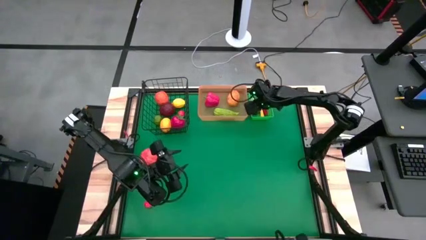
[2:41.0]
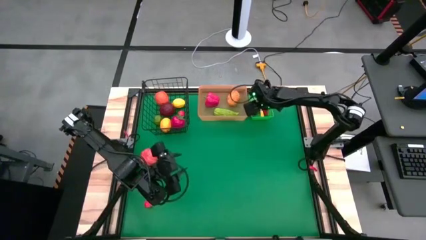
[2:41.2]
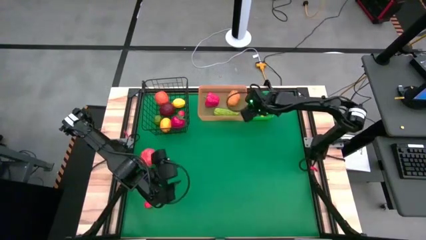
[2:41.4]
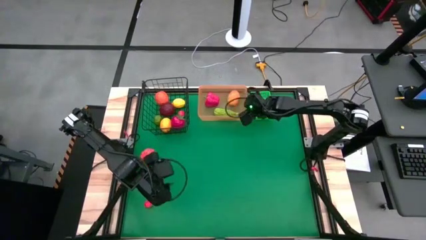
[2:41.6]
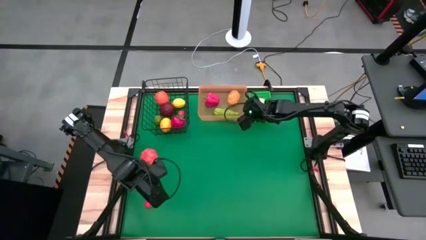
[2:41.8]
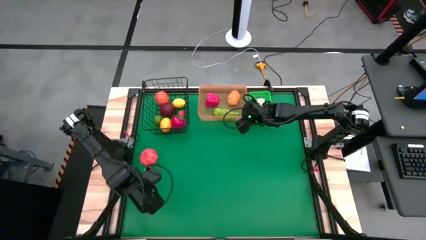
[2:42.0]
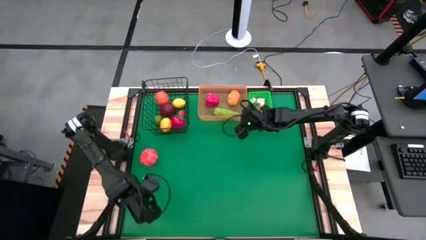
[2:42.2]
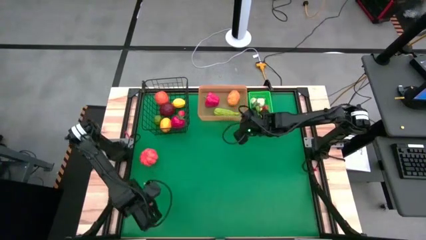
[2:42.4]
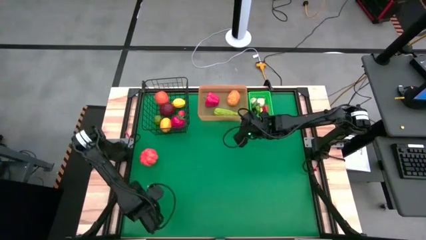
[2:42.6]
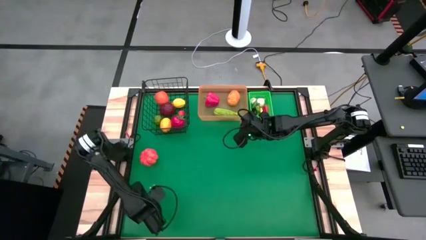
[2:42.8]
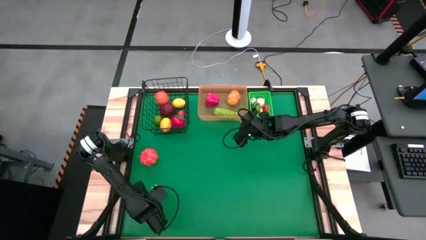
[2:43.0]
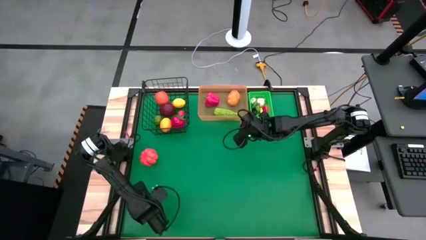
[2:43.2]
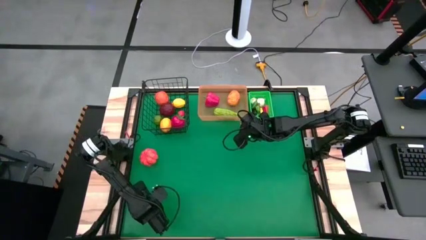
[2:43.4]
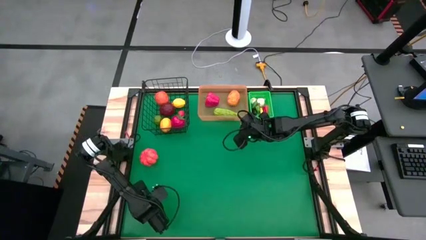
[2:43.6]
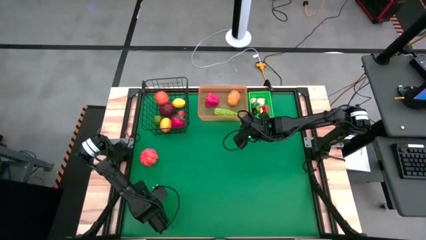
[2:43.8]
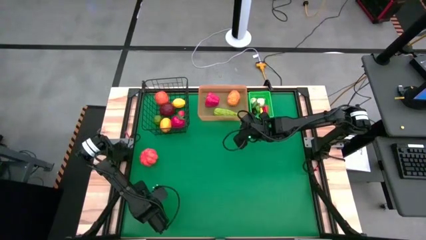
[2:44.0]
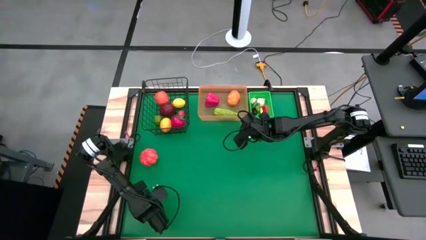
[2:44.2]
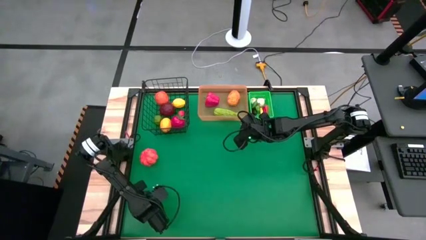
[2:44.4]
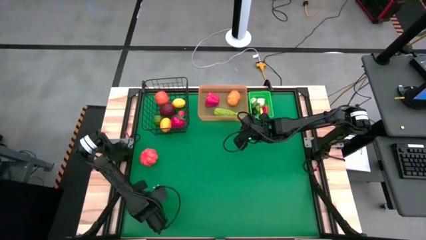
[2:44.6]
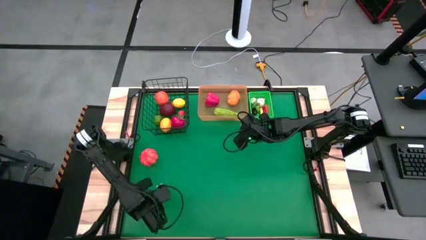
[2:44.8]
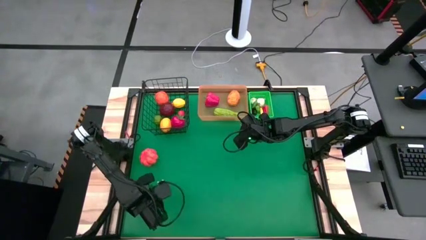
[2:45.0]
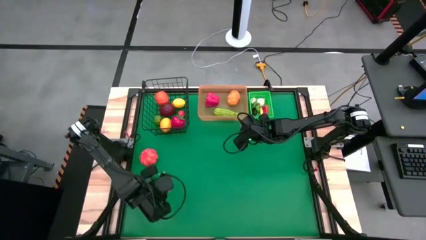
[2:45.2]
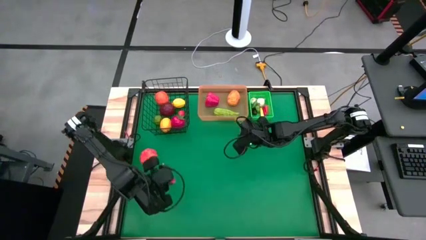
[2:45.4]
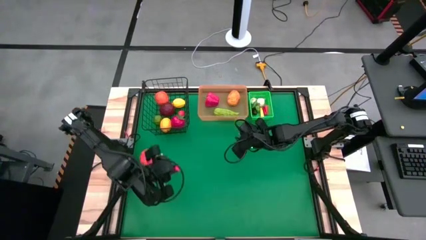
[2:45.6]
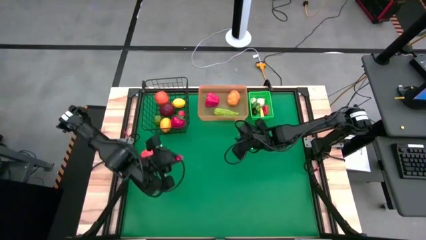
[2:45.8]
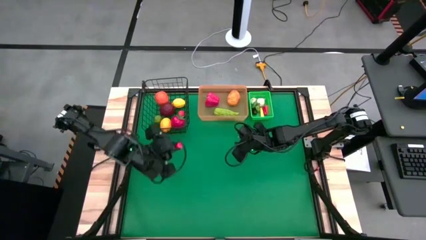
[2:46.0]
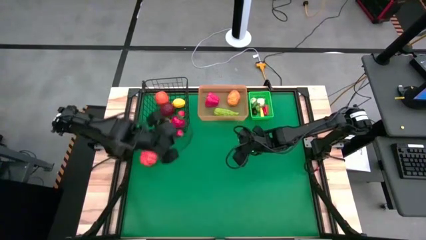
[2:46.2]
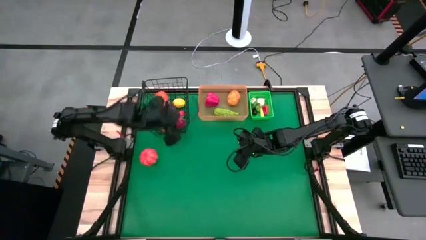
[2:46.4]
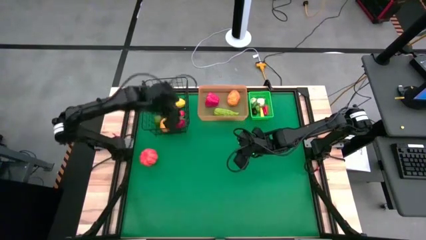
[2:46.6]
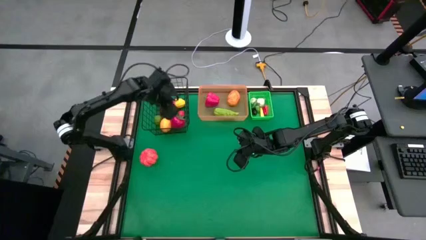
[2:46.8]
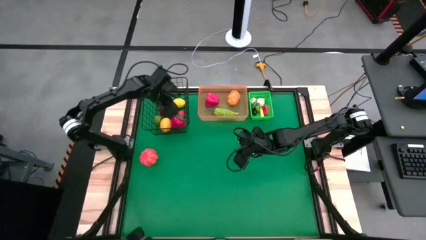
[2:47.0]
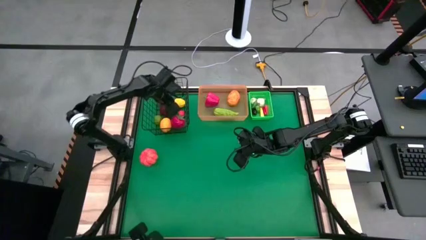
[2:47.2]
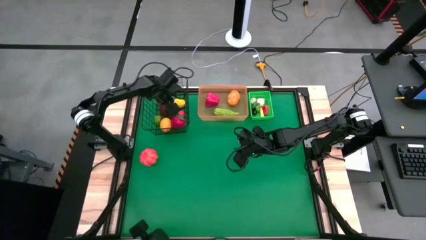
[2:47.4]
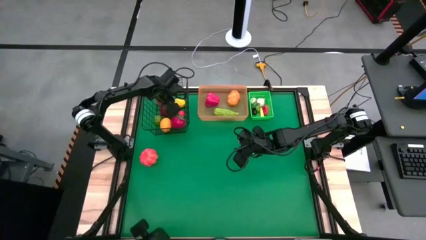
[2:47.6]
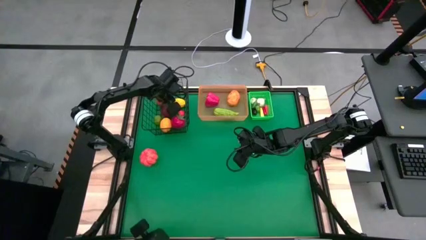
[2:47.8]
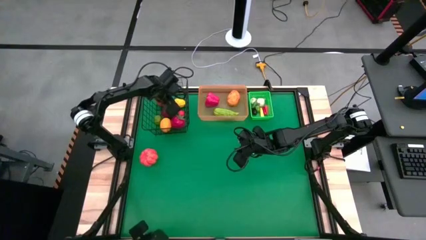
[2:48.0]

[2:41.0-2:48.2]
Task: Sort produce into baskets
Put the red peach into the black wire basket

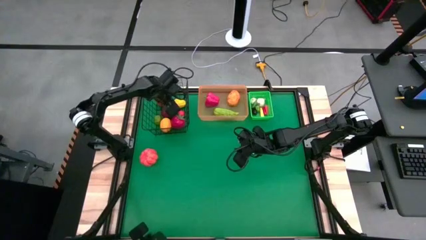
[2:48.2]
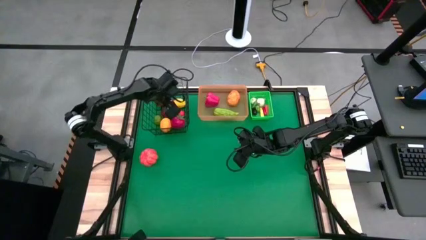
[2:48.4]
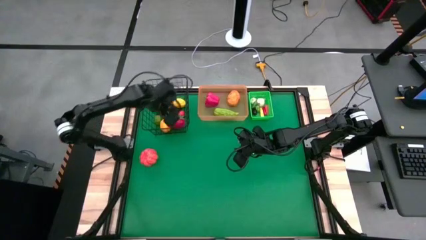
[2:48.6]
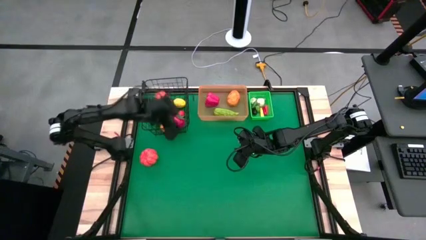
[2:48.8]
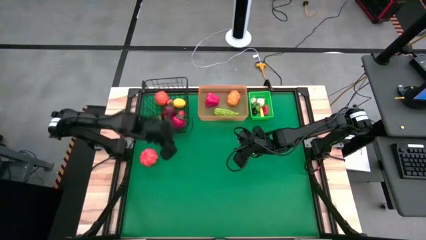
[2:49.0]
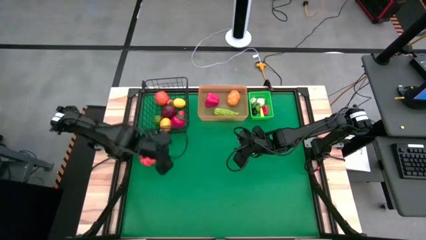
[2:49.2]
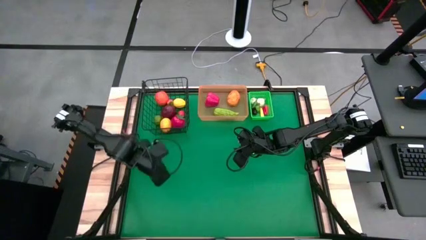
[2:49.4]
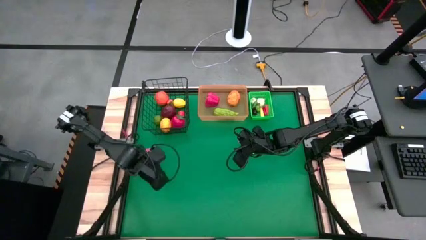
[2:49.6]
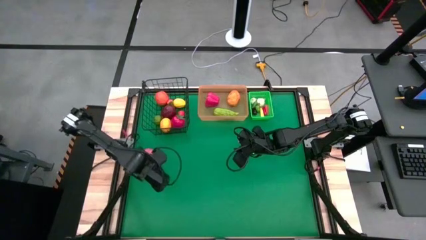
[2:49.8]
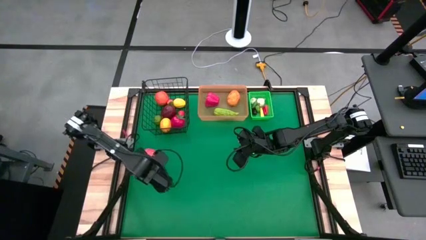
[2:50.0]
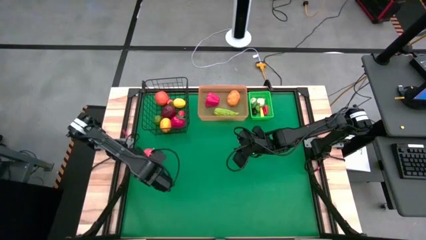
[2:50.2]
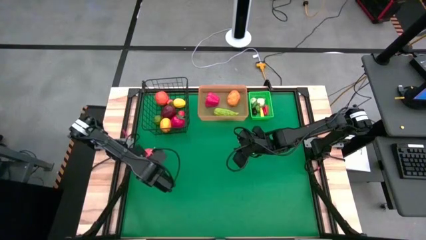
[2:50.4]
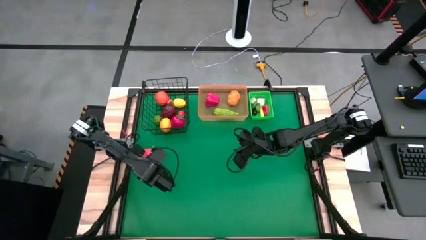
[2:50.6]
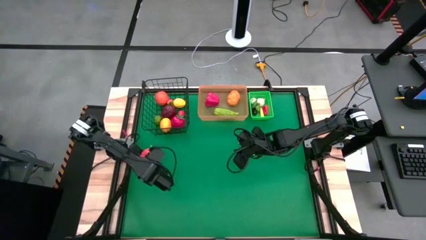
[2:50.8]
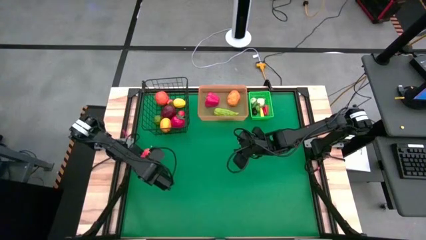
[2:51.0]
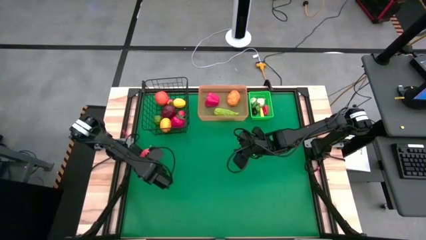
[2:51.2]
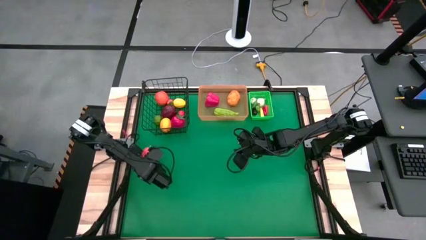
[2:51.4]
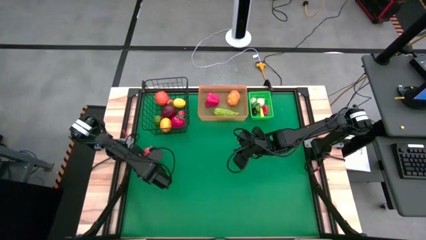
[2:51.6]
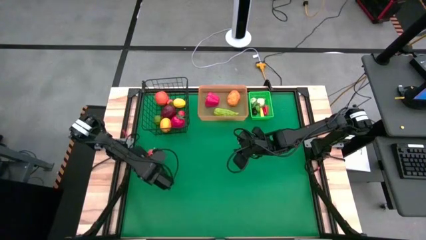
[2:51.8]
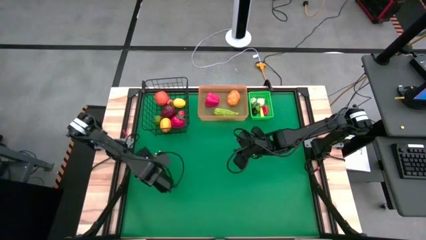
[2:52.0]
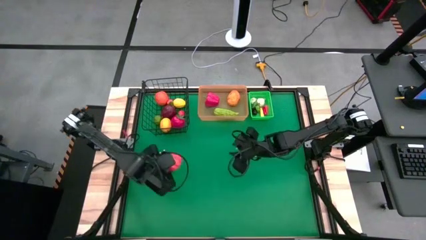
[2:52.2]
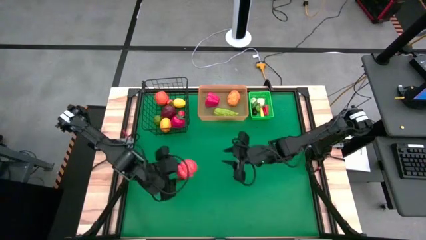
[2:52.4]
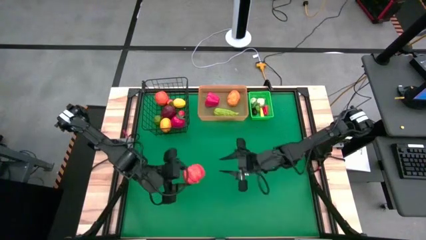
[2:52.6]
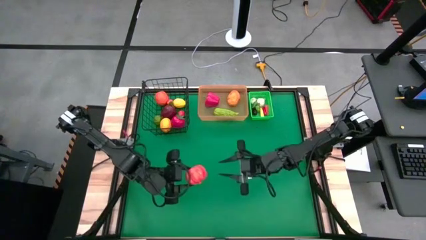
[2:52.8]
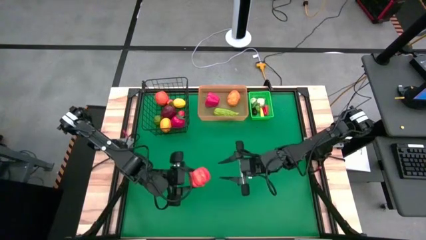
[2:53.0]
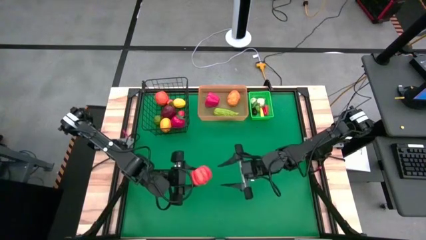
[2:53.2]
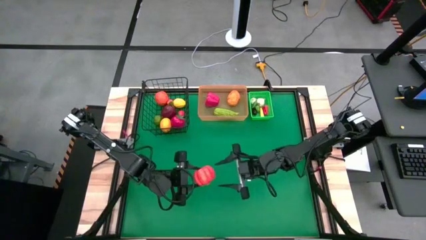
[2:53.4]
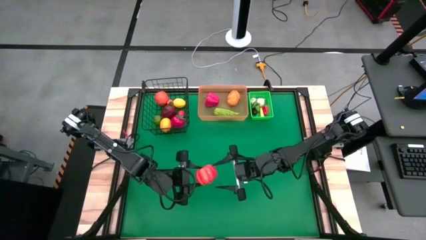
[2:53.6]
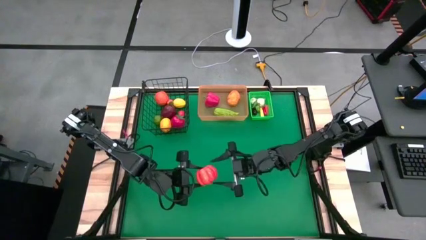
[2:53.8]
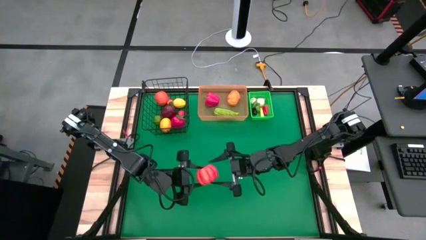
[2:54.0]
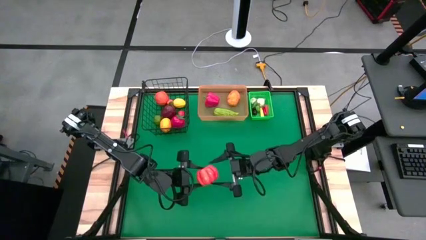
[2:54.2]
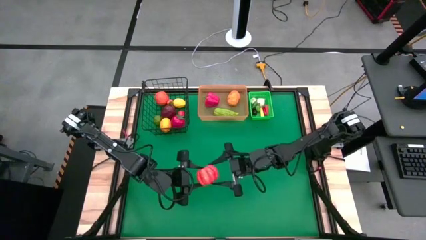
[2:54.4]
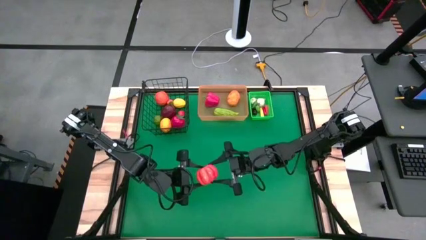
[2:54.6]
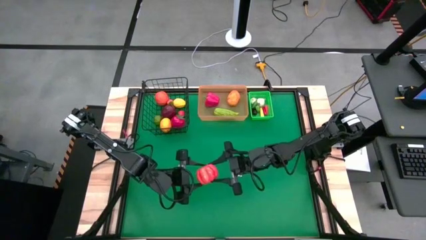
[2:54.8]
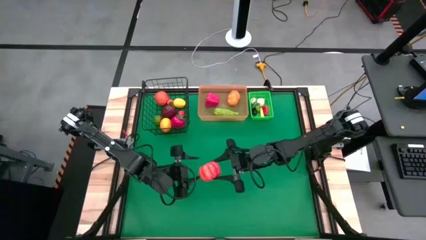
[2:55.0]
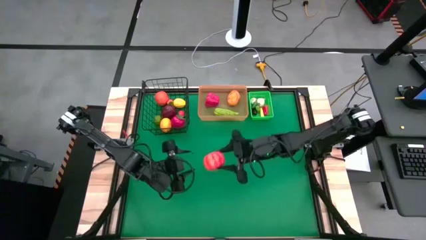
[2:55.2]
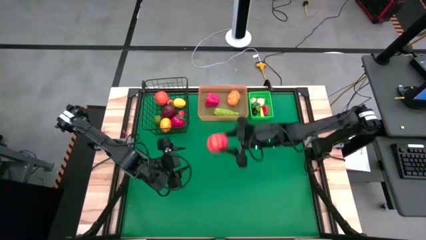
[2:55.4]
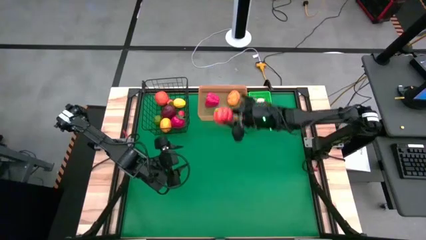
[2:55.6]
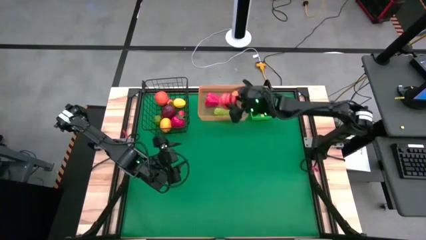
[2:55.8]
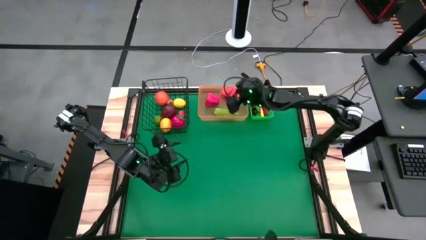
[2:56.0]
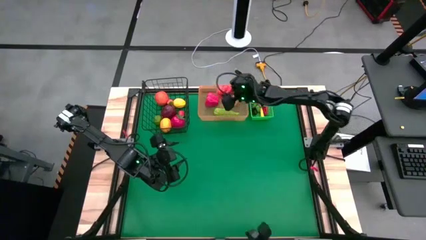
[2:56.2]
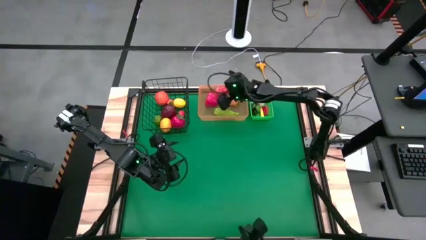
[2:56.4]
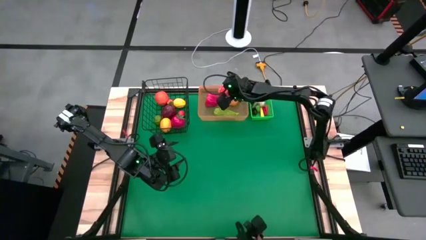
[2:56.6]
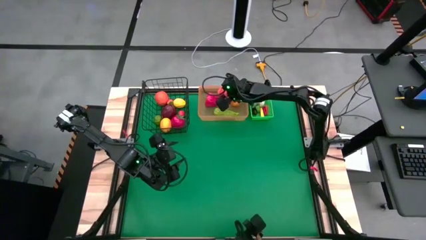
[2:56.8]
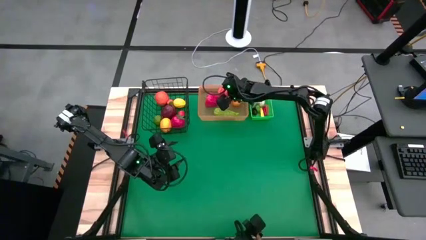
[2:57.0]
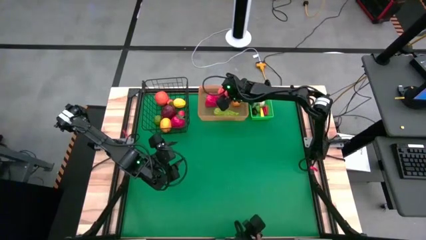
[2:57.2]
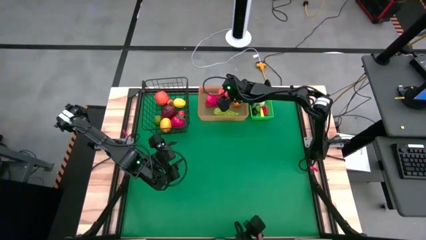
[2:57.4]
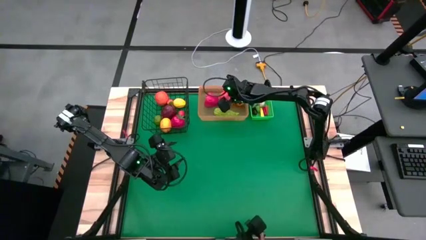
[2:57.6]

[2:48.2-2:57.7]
Put the orange squash into the black wire basket
